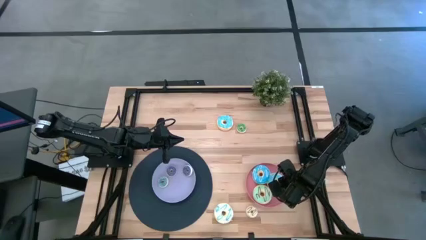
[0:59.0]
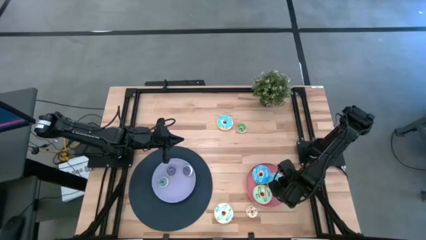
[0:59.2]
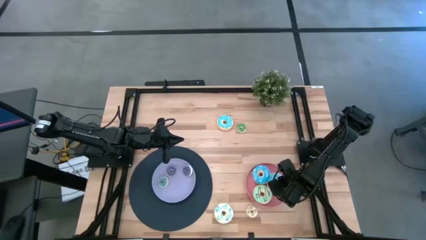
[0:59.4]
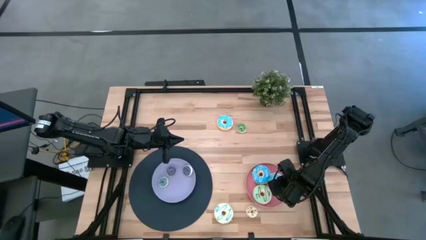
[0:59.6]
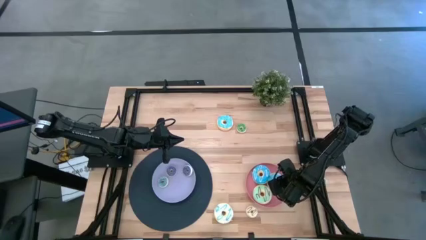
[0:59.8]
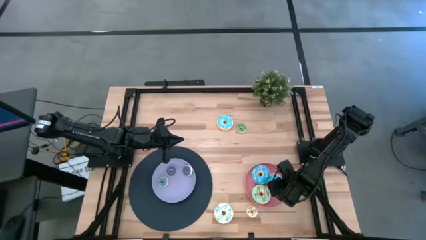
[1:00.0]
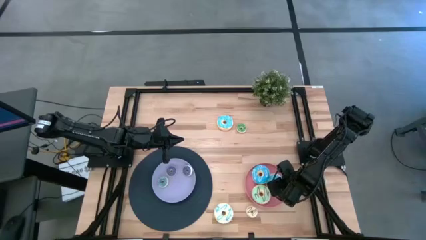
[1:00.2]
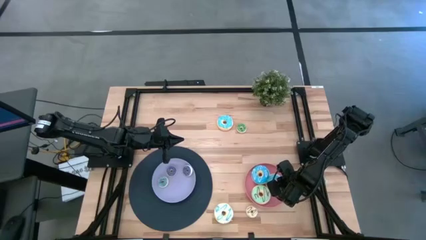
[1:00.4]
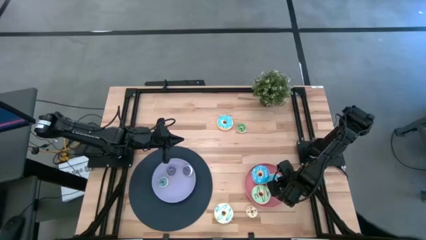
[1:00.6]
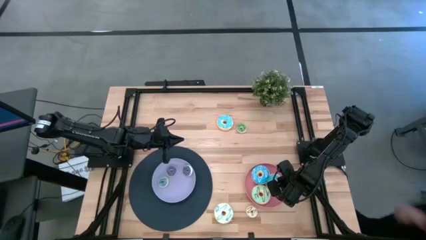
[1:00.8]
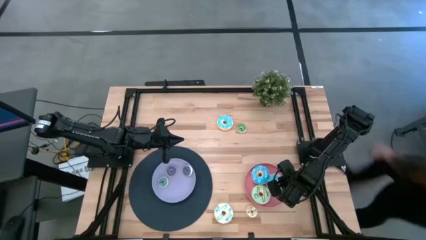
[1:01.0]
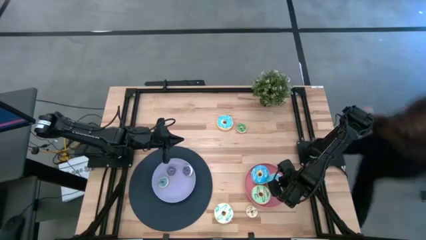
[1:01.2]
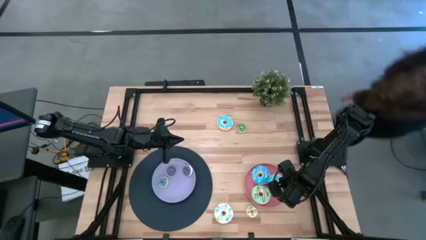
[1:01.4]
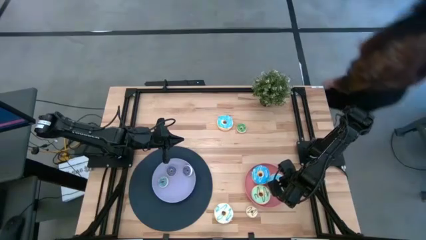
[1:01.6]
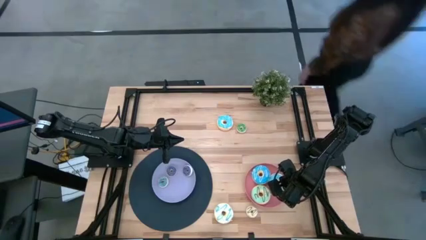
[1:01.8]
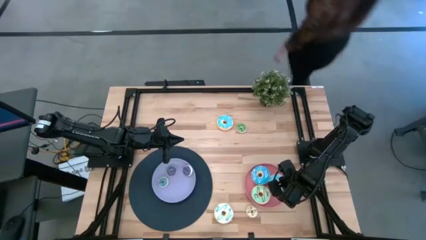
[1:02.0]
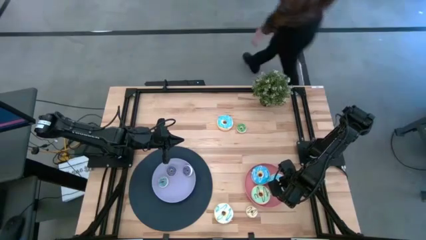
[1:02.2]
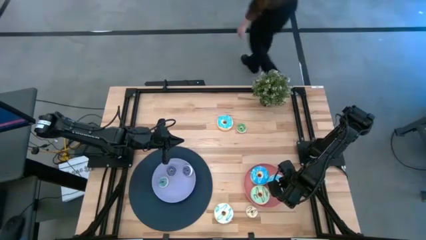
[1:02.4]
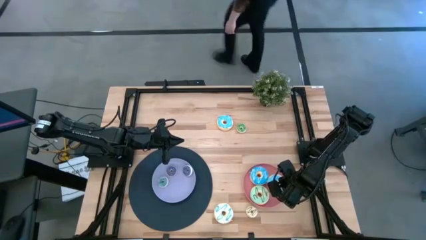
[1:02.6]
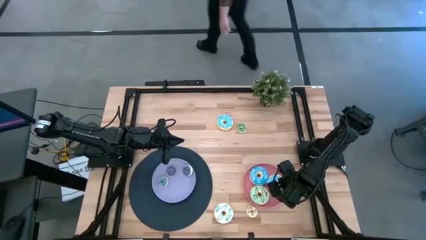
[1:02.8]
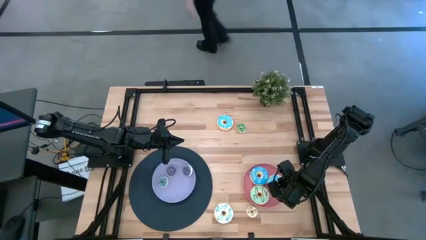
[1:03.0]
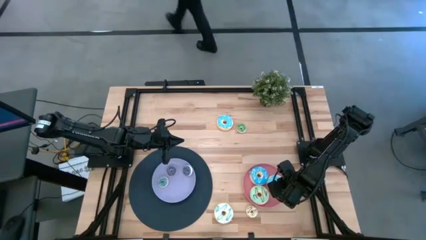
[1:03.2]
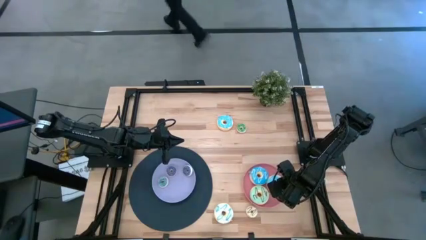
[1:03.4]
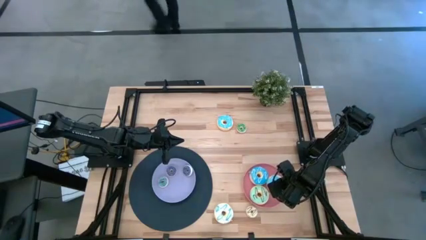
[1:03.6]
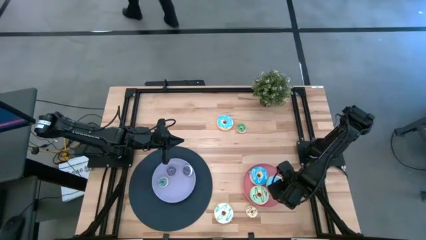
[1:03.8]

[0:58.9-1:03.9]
Task: Pick & Place donuts
Adjust the large blue donut on the pink plate

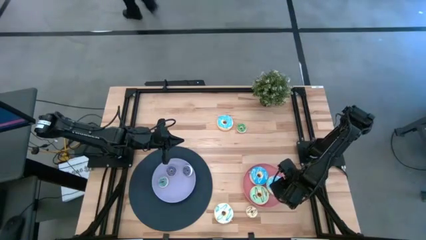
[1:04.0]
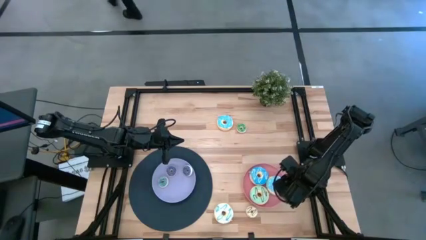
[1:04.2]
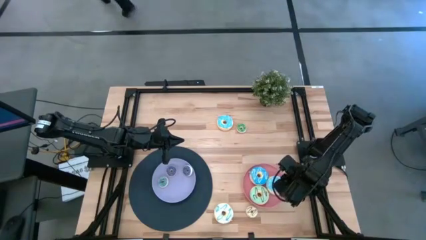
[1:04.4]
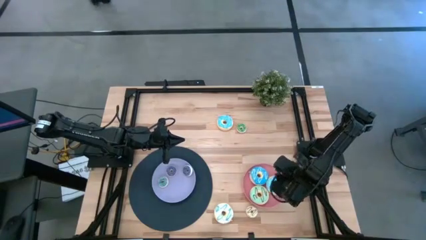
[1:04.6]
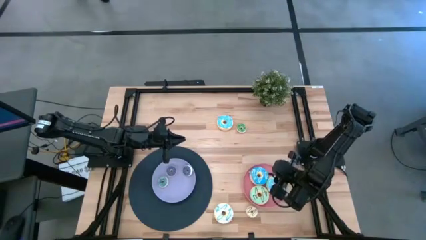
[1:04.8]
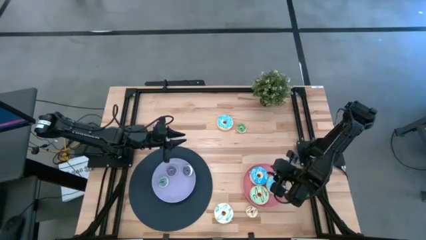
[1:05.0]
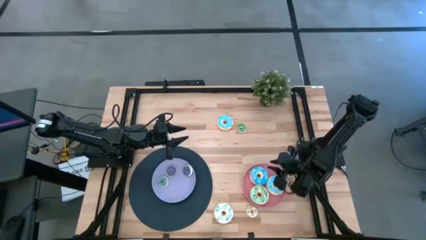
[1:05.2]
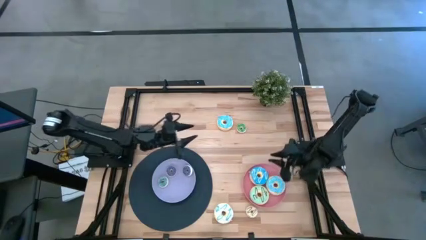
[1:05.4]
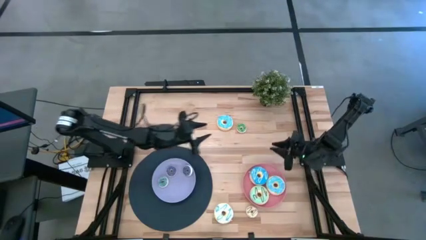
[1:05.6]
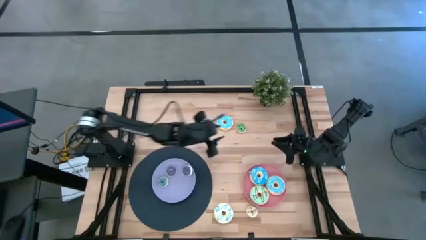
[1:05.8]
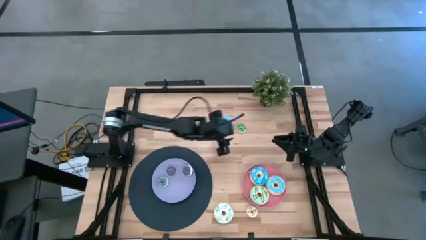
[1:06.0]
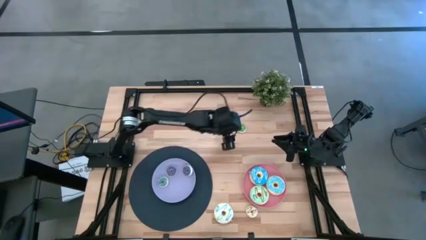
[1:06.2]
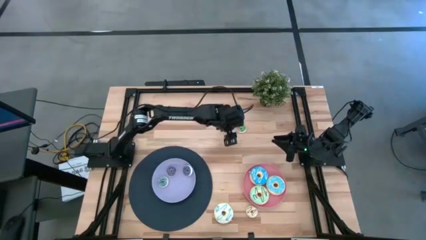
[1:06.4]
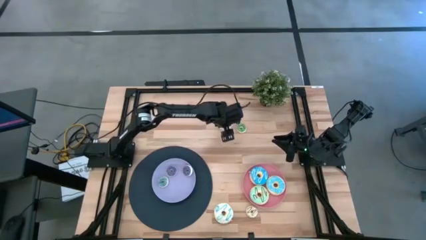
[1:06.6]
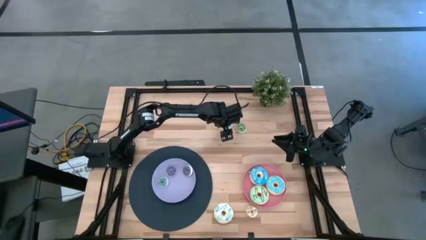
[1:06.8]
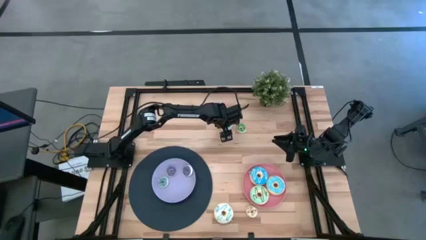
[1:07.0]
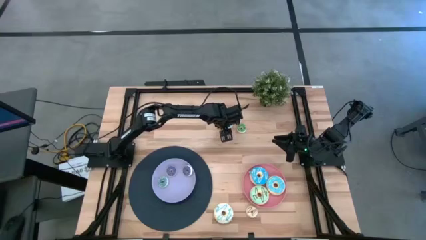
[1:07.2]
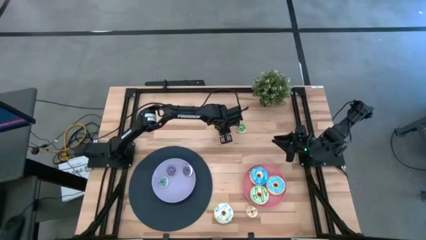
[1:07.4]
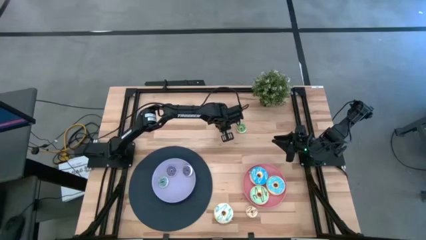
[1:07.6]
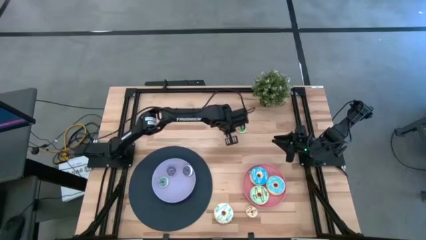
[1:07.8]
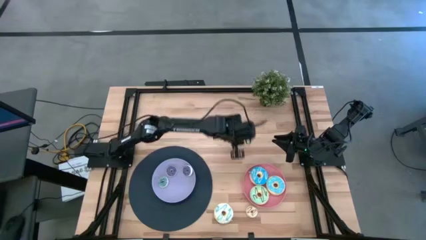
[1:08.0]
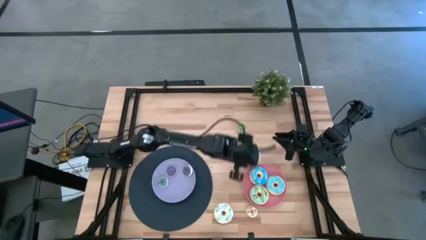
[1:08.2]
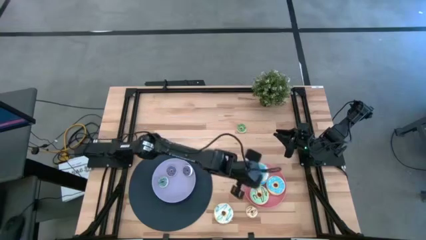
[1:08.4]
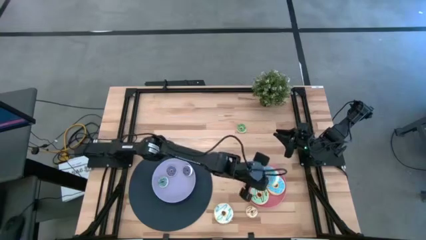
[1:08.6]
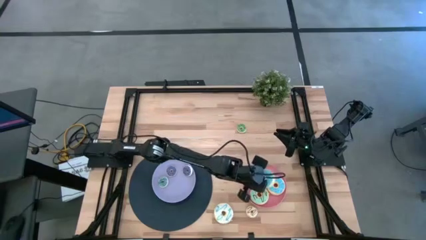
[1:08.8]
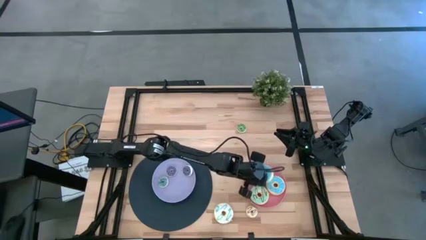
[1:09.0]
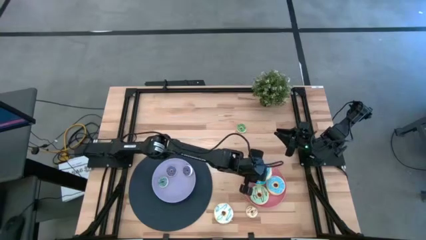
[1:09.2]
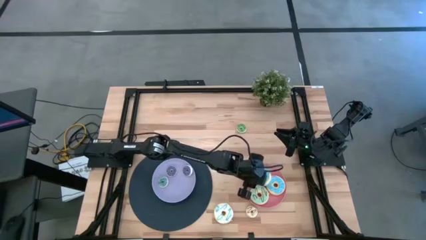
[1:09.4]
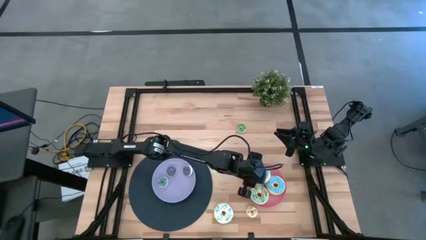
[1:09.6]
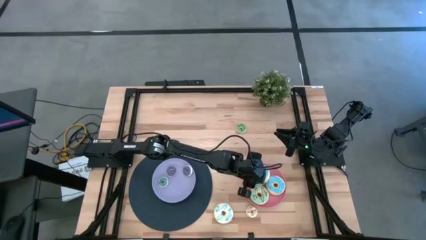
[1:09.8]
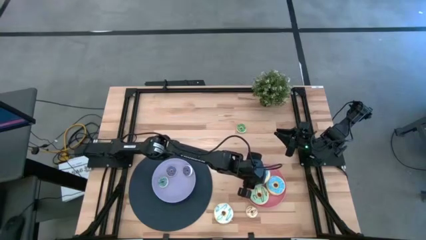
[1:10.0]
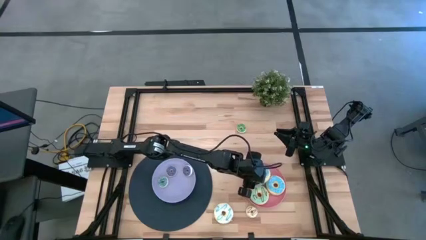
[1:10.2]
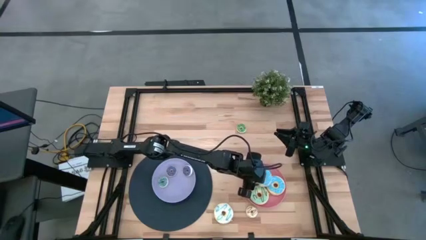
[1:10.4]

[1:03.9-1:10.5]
Put the large blue donut on the pink plate

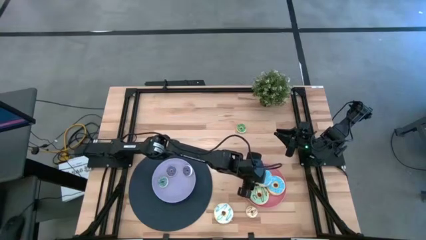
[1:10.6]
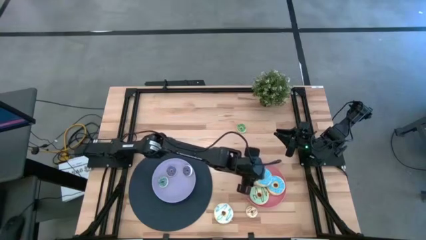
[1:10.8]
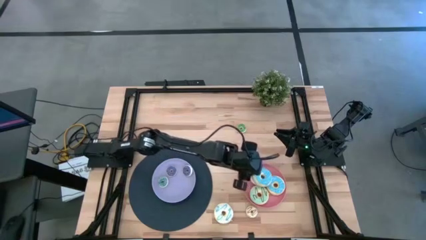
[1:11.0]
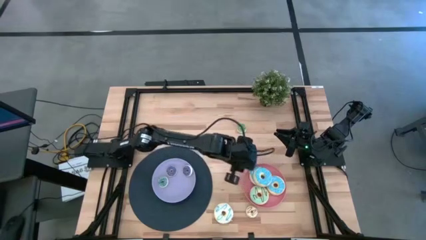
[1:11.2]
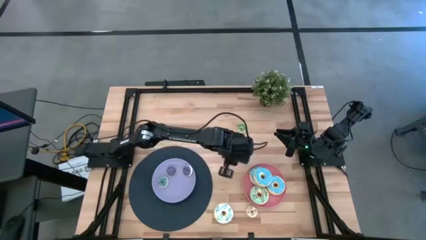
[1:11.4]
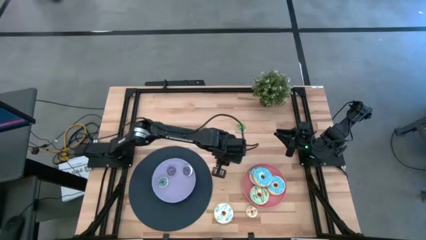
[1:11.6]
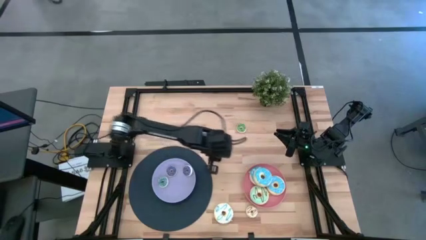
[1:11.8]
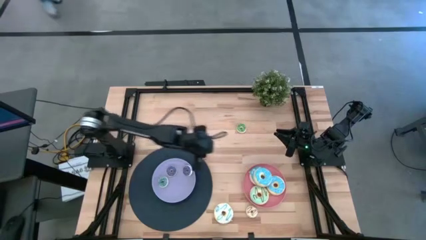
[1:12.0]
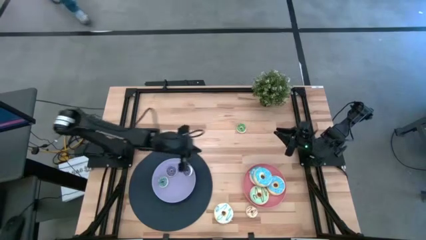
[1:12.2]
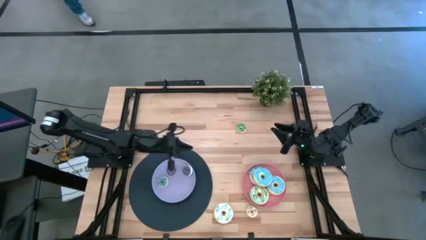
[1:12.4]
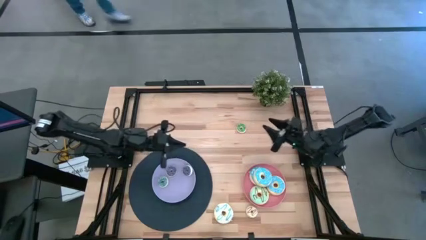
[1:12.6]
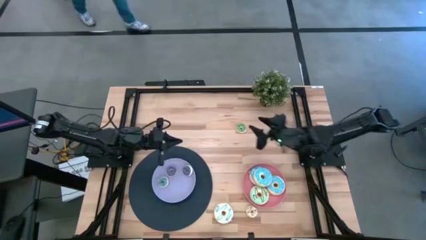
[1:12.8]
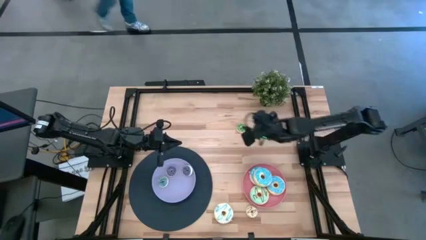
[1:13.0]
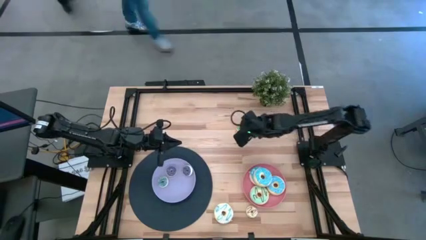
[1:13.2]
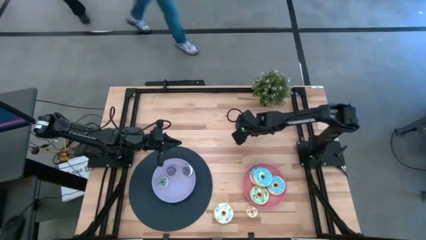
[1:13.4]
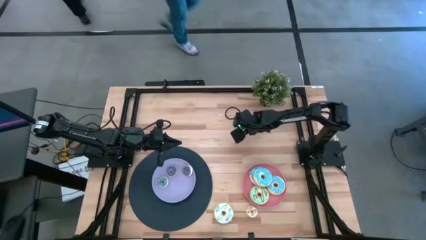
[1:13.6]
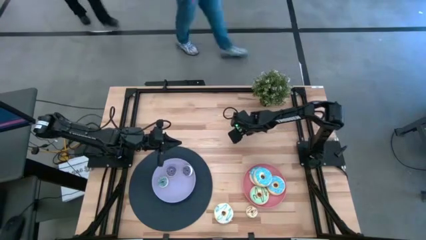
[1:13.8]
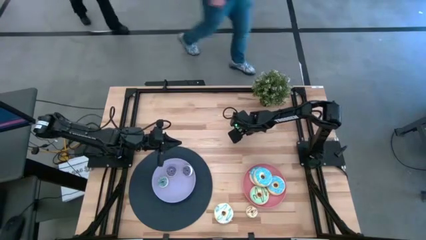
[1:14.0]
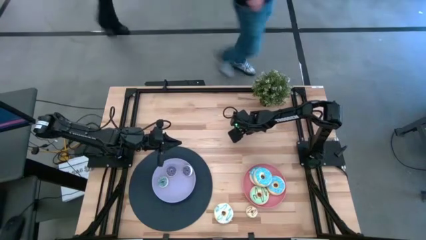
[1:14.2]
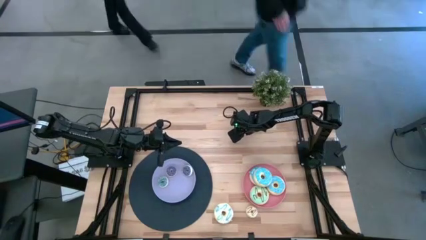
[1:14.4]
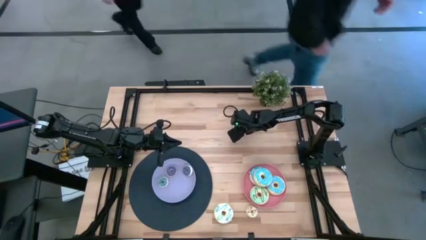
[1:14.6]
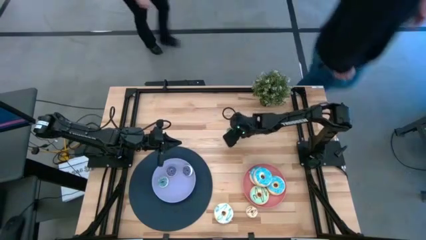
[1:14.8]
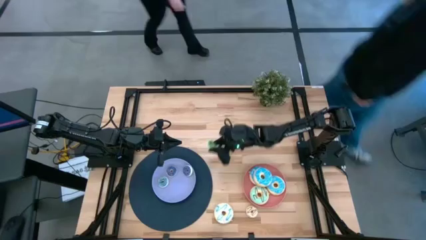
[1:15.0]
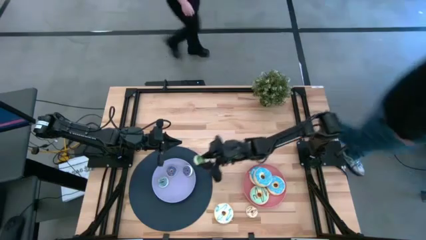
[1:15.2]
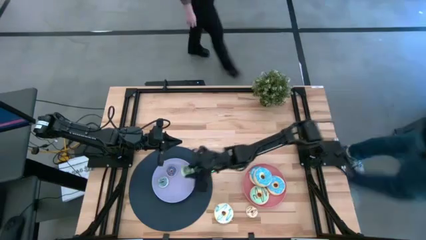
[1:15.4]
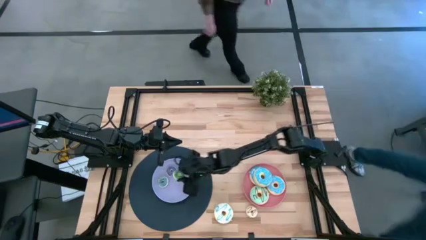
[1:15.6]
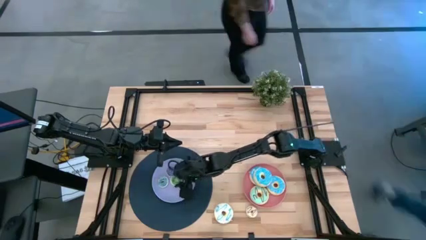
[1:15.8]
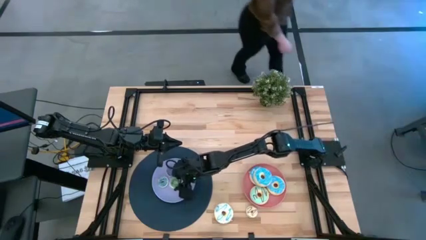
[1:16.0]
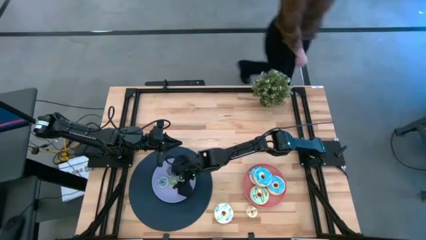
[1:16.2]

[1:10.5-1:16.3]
Put the small green donut on the purple plate
